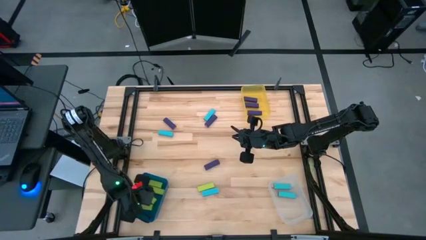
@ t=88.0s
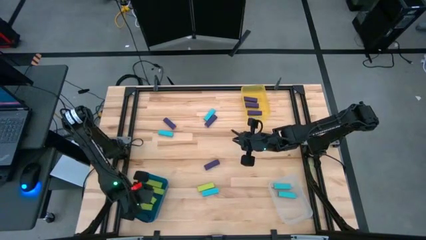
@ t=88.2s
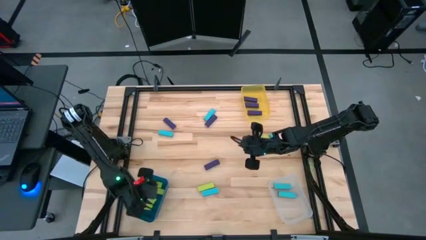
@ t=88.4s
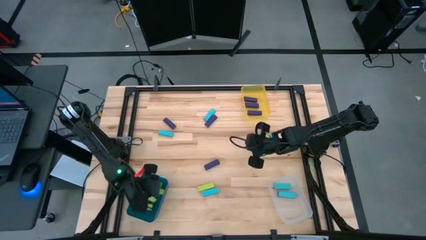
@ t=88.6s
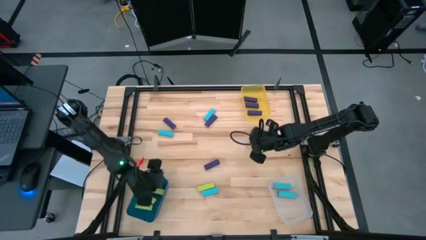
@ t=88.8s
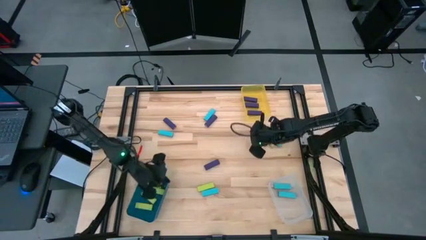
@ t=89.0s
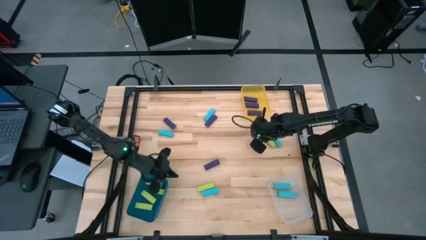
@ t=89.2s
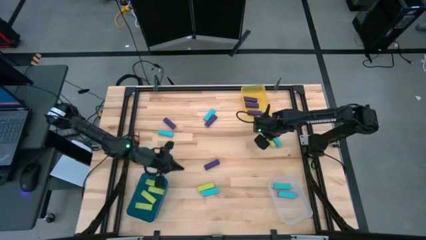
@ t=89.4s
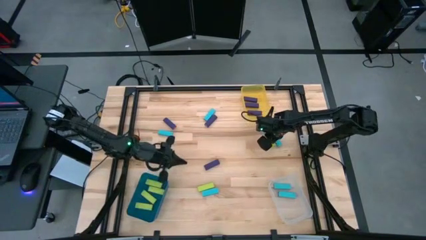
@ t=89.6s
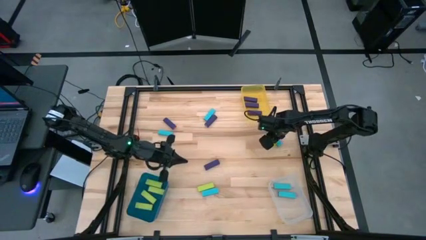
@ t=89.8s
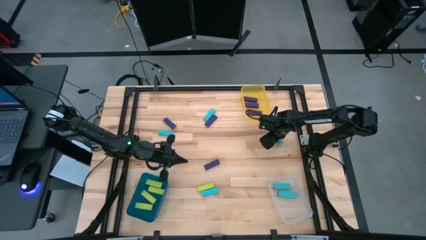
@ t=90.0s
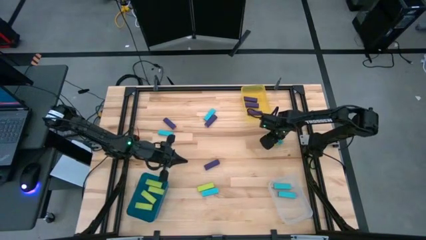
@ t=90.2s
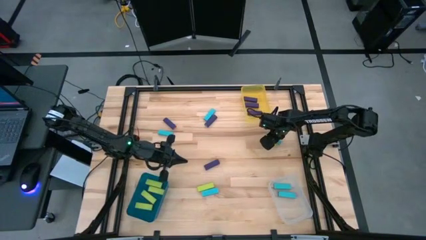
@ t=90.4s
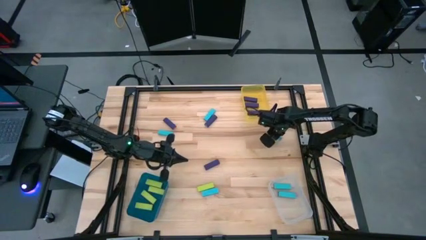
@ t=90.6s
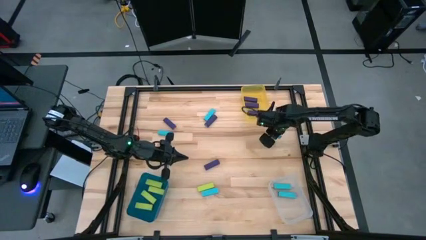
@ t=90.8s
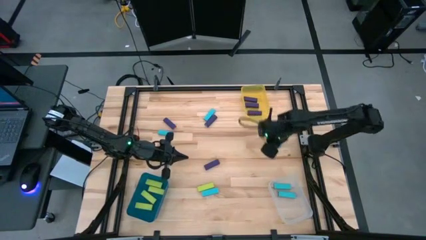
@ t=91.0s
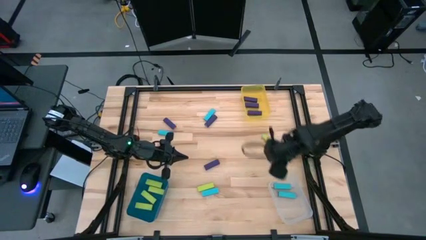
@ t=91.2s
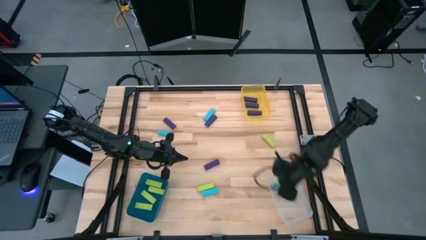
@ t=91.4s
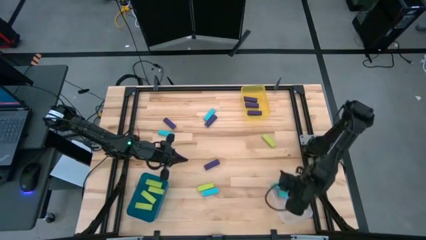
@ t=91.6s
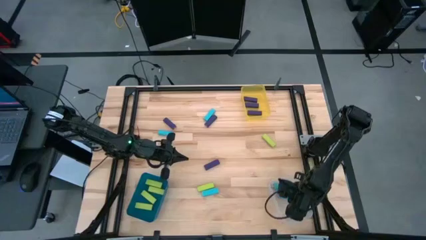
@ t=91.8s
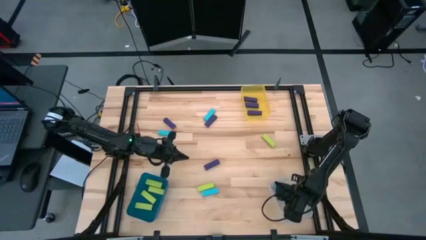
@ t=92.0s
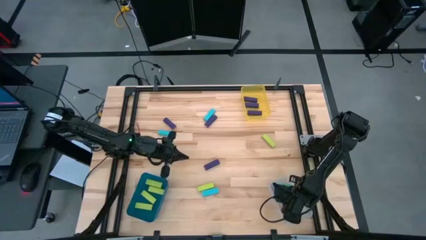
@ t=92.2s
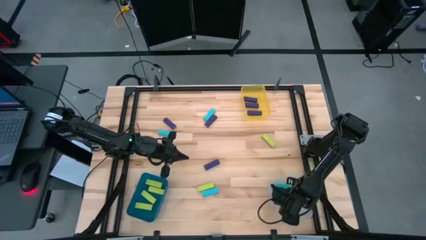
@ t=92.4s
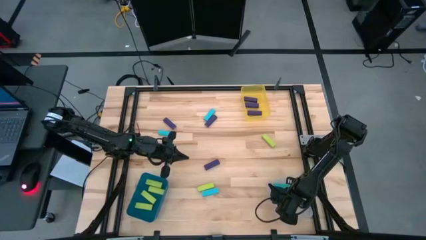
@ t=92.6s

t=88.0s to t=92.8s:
Task: Sort blocks
Put the light blue block into the transparent bin

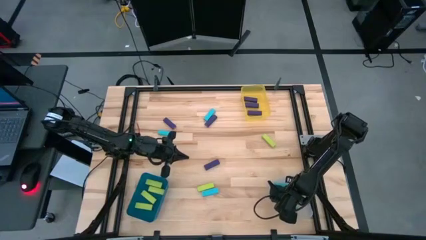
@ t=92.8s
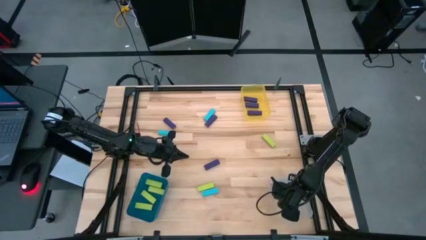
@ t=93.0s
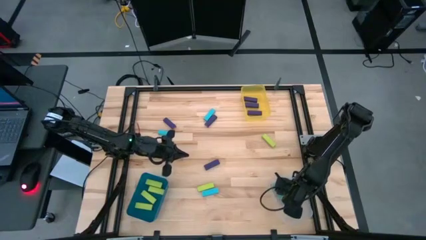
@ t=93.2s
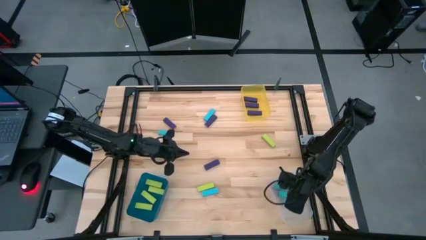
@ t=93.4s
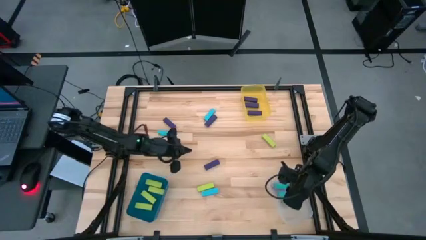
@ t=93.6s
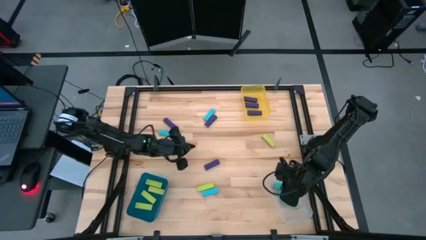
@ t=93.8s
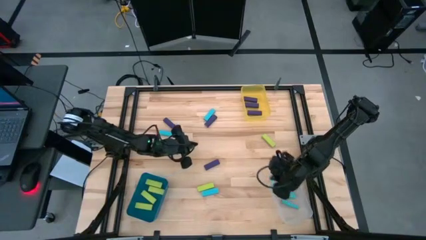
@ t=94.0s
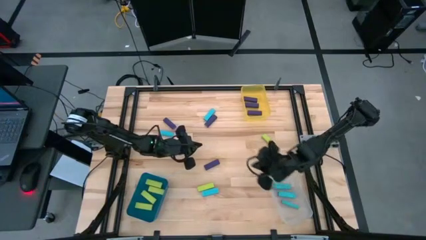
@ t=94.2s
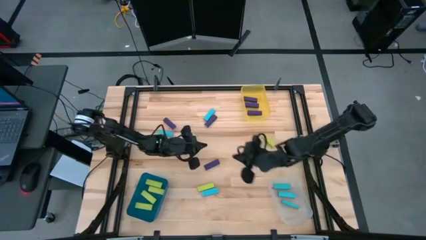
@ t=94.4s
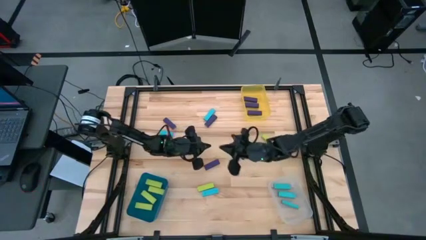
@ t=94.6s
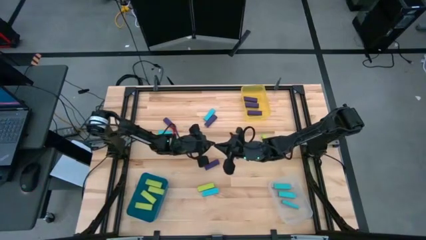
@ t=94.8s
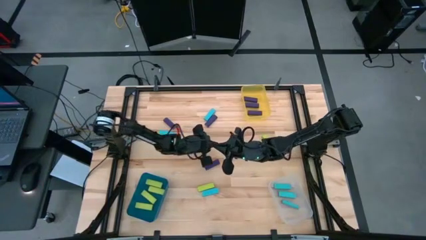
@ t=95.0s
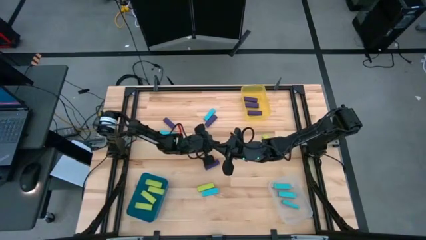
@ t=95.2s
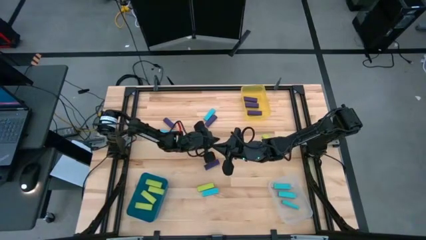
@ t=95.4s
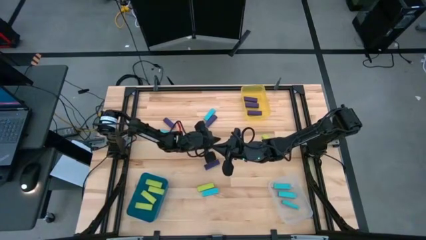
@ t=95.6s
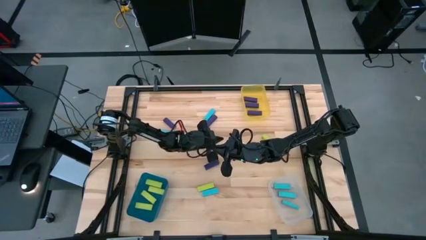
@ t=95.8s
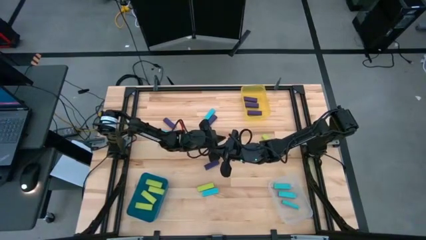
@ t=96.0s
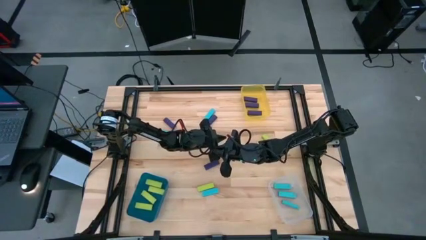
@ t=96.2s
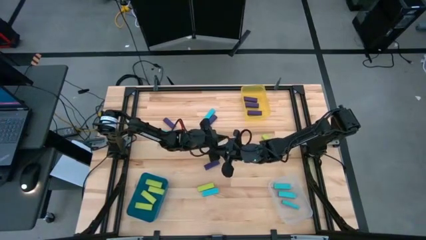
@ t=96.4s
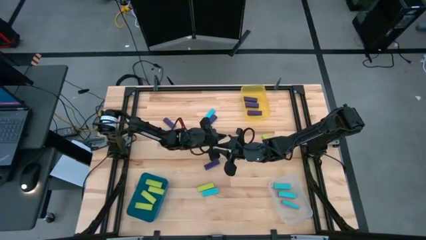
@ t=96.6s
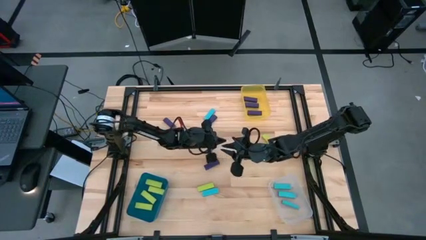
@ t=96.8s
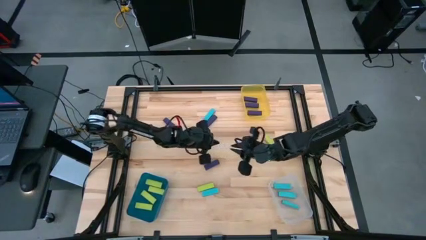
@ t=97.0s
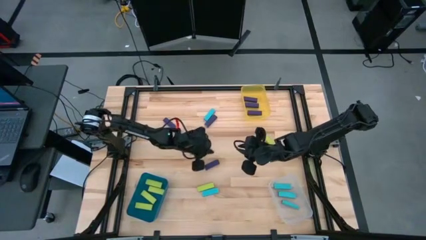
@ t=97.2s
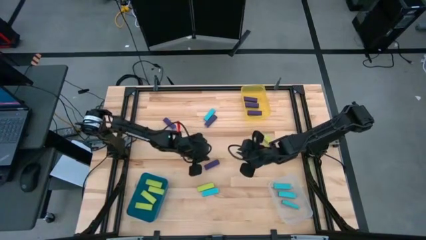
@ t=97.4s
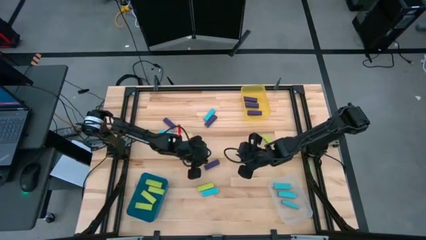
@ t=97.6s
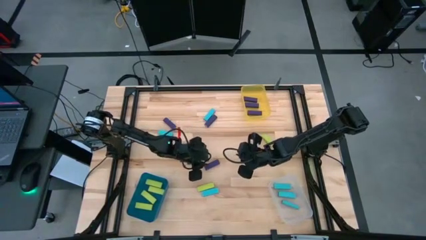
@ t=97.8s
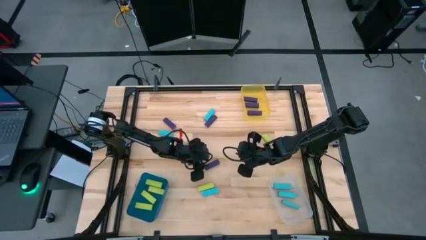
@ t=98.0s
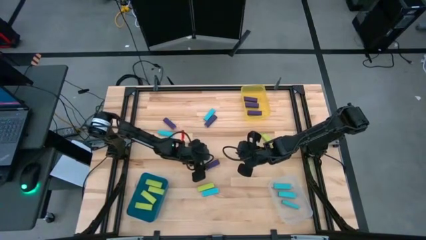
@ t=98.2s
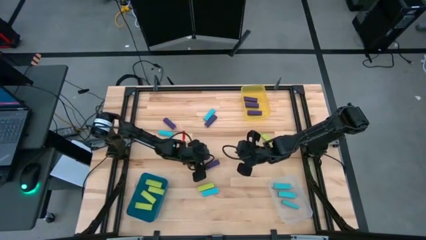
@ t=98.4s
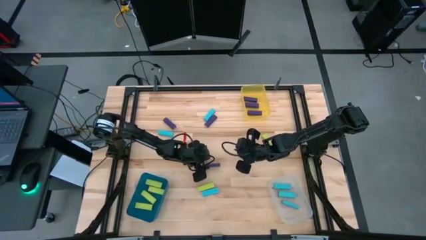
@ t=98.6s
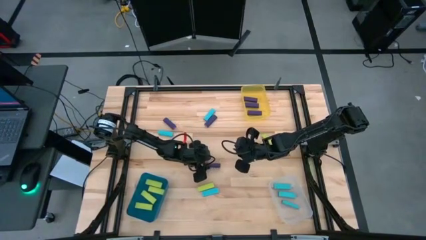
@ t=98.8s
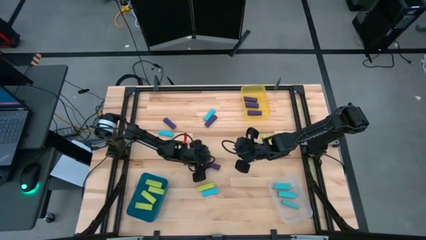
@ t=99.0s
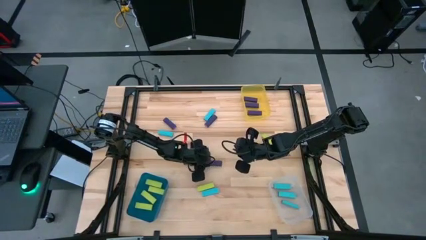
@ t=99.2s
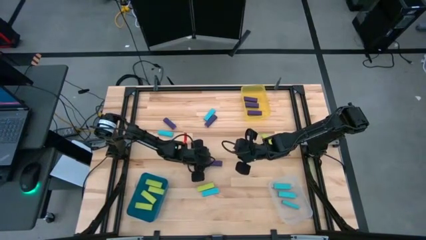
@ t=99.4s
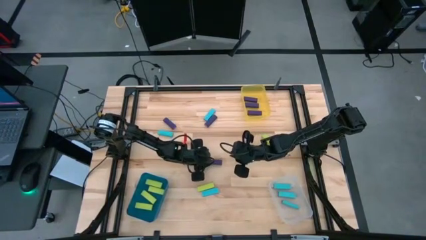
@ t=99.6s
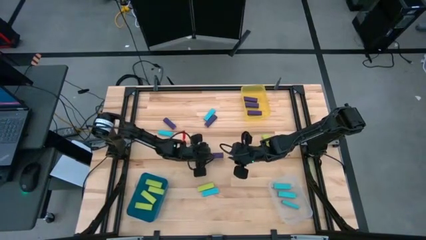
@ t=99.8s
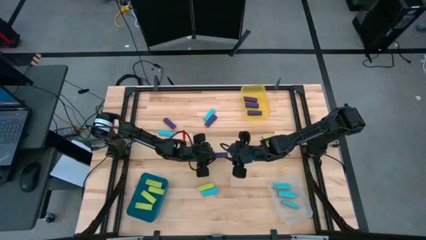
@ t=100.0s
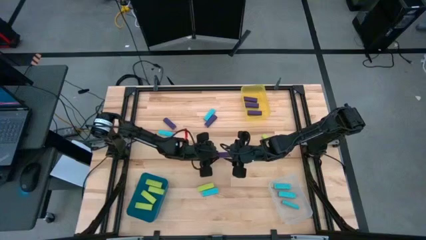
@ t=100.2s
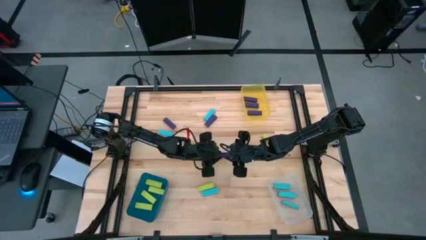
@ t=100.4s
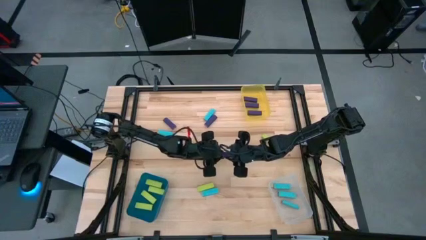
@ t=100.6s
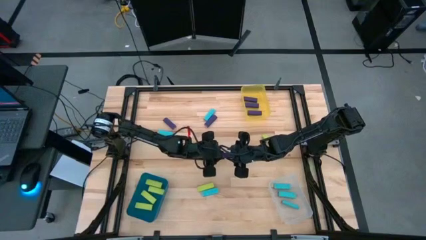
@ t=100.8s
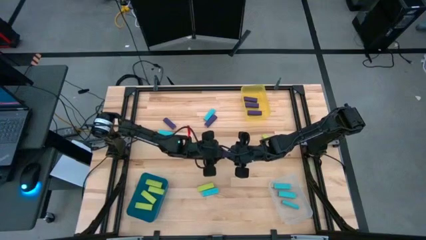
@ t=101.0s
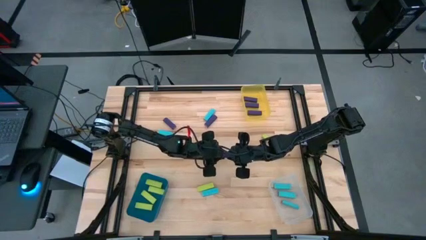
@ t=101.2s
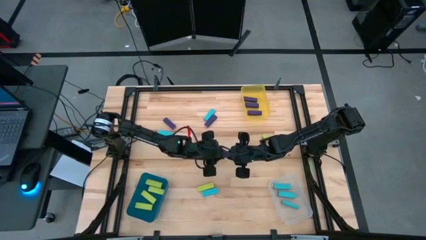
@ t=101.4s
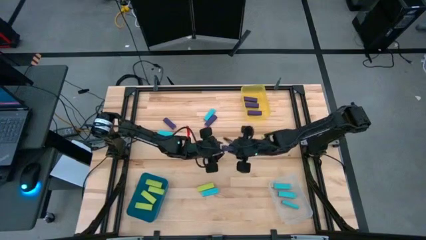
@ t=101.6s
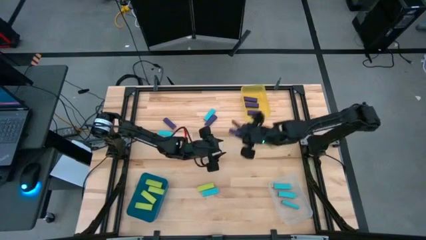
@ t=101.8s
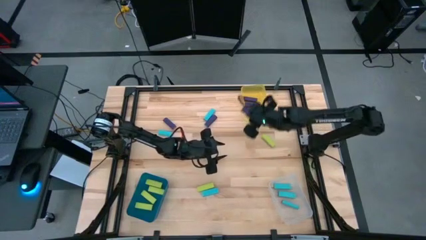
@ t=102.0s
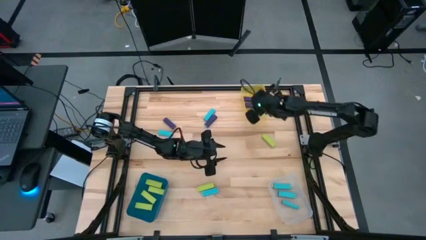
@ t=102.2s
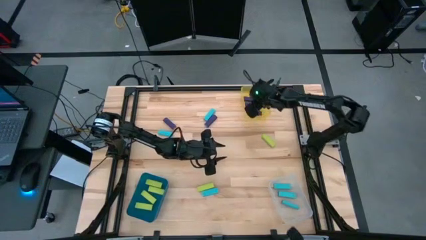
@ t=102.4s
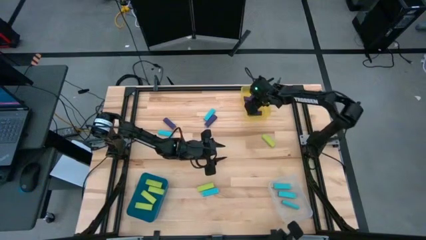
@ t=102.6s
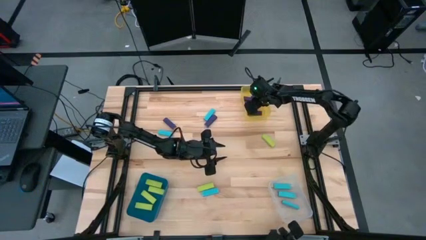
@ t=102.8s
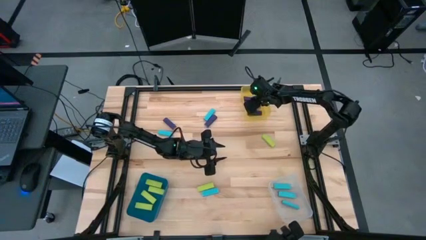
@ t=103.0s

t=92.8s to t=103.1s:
Put the violet block into the transparent yellow bin

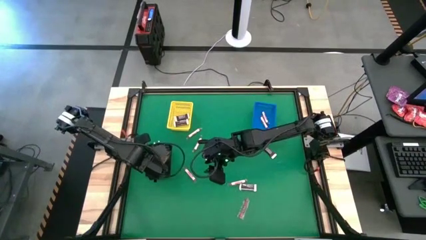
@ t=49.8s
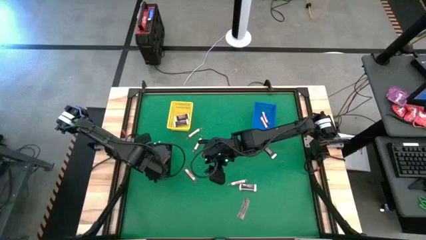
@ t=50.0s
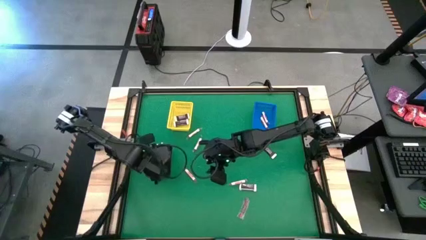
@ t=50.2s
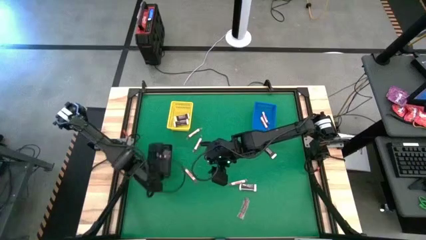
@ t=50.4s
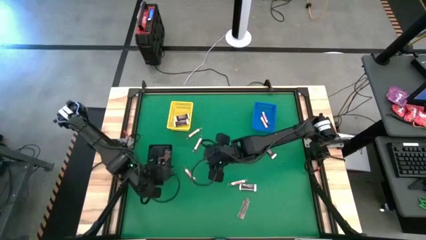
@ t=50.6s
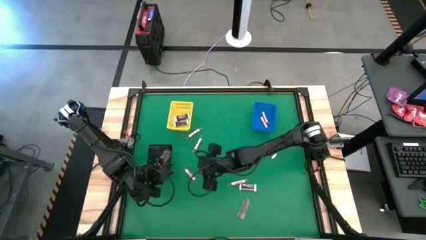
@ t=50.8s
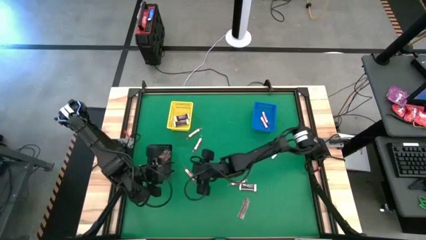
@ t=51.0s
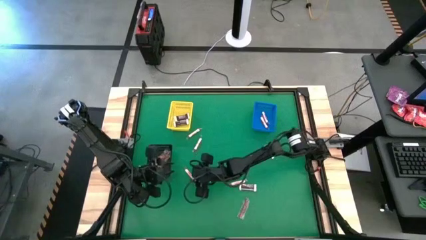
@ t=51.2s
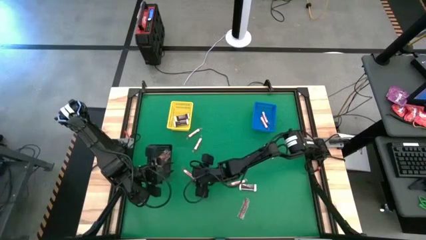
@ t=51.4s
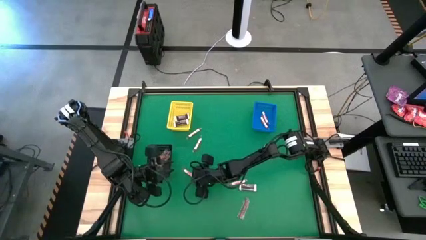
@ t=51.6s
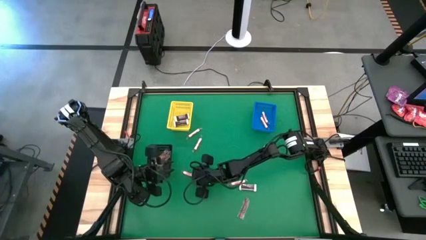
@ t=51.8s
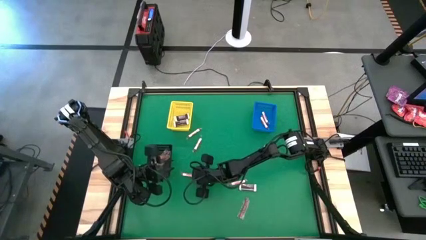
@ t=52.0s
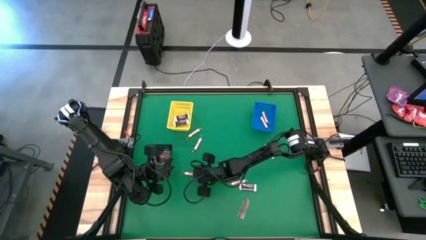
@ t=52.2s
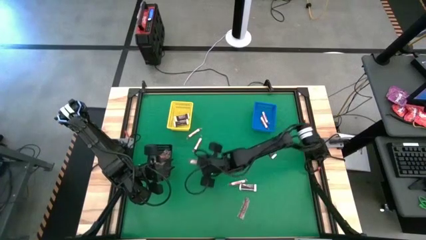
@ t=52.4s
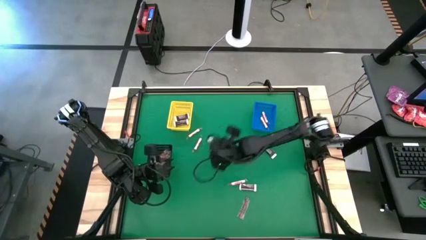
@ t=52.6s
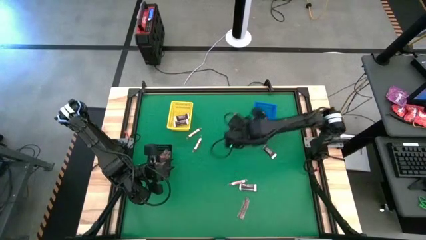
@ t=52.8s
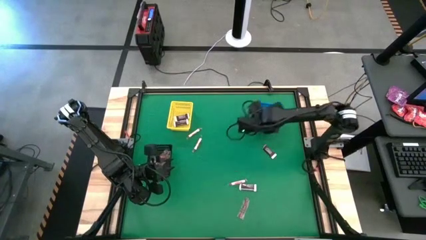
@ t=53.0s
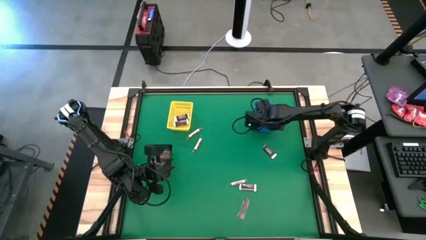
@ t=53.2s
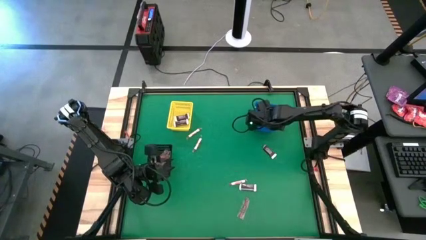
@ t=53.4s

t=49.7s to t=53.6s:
Task: Sort candy by brand, put in halloween buckets
Put the white candy stick into the blue bin
